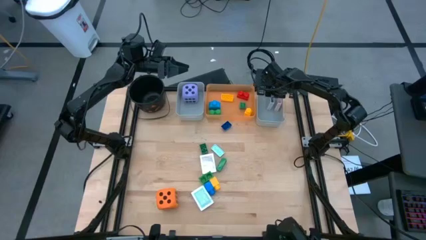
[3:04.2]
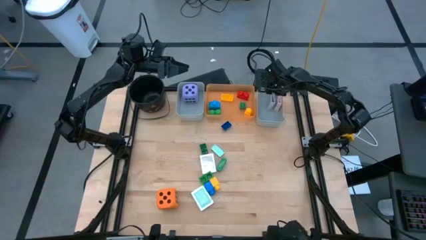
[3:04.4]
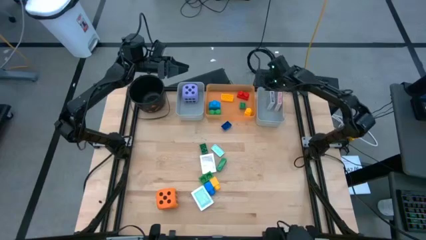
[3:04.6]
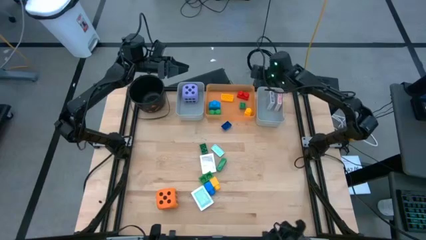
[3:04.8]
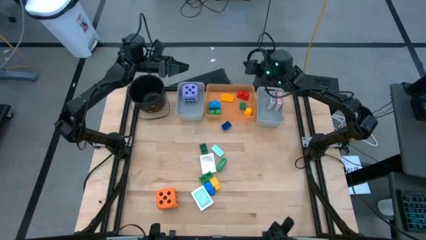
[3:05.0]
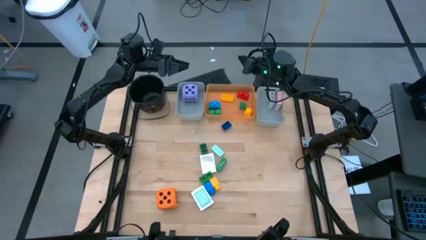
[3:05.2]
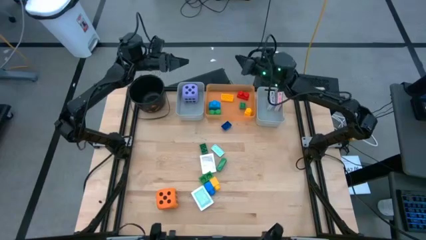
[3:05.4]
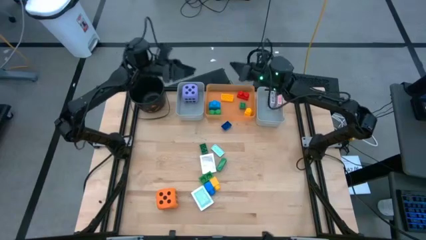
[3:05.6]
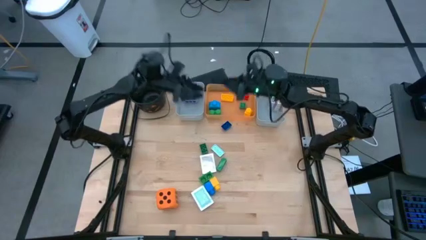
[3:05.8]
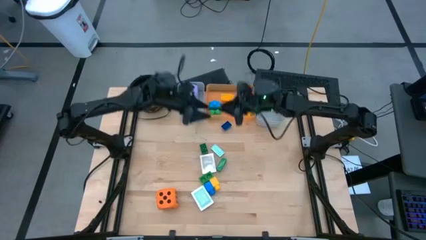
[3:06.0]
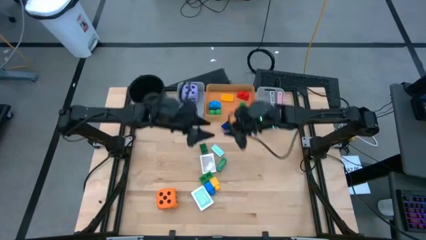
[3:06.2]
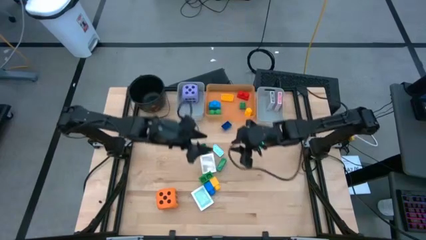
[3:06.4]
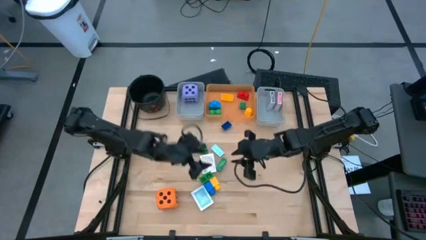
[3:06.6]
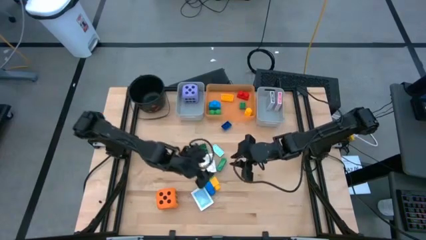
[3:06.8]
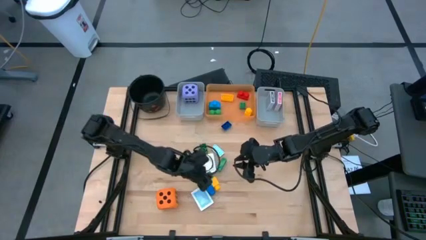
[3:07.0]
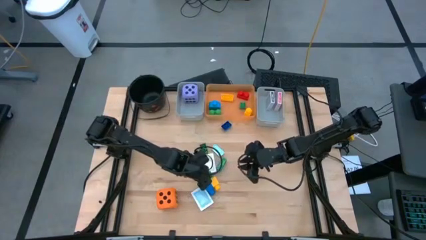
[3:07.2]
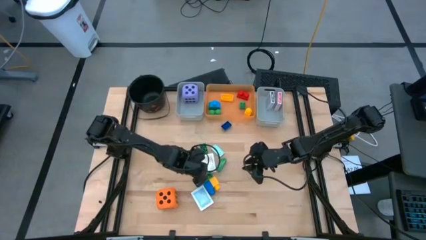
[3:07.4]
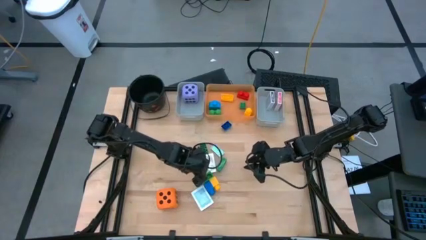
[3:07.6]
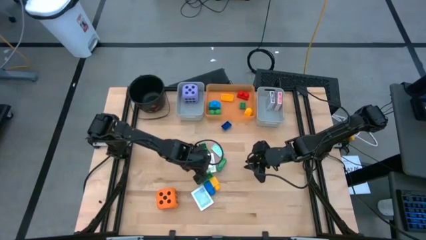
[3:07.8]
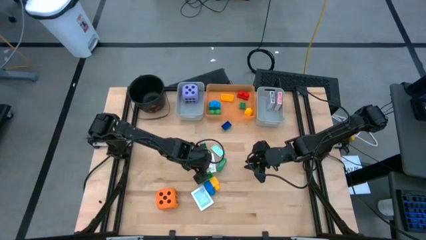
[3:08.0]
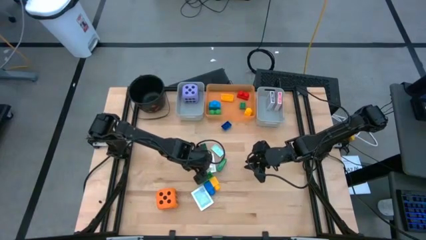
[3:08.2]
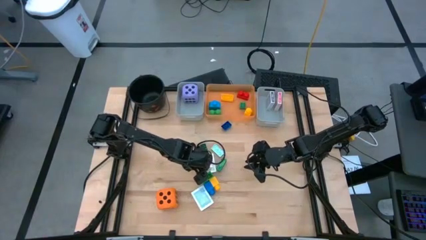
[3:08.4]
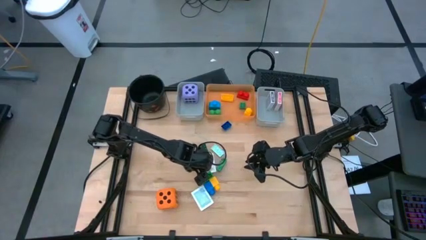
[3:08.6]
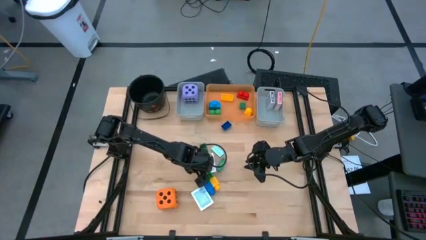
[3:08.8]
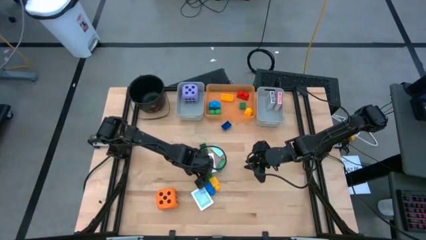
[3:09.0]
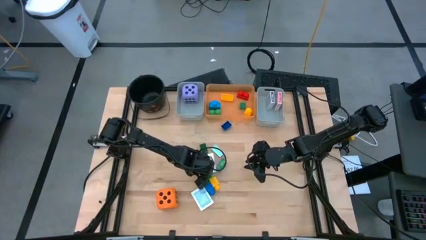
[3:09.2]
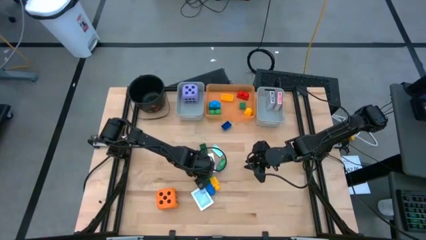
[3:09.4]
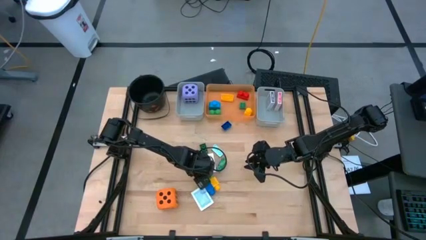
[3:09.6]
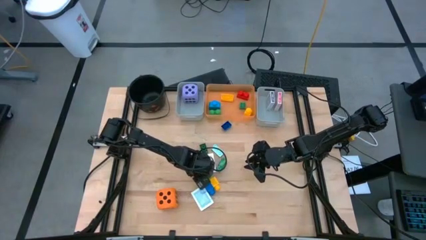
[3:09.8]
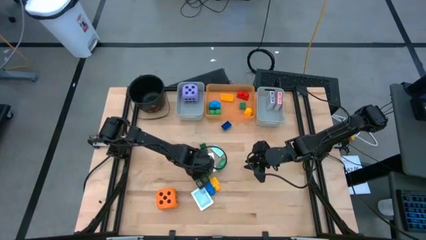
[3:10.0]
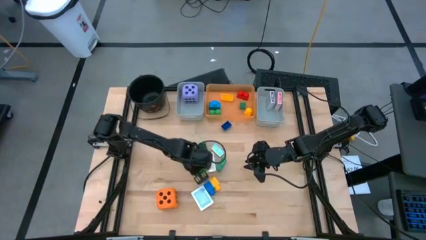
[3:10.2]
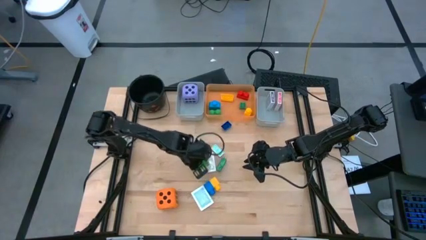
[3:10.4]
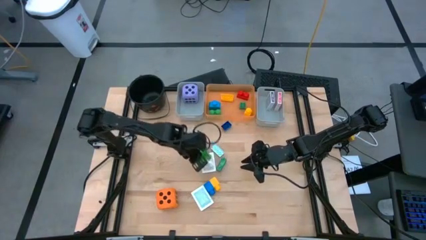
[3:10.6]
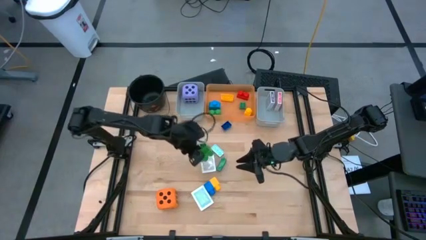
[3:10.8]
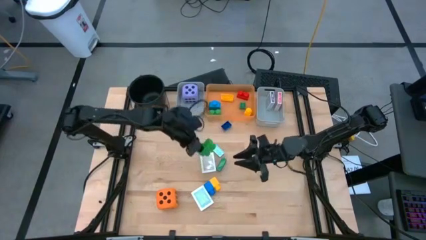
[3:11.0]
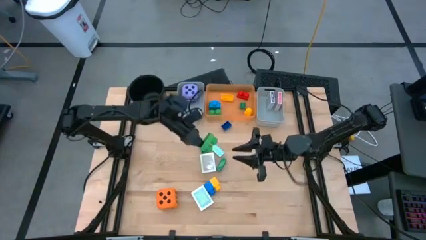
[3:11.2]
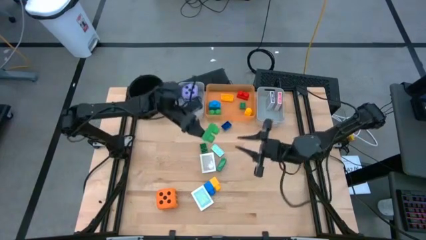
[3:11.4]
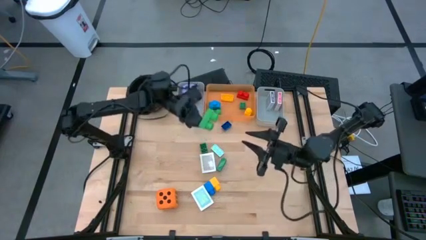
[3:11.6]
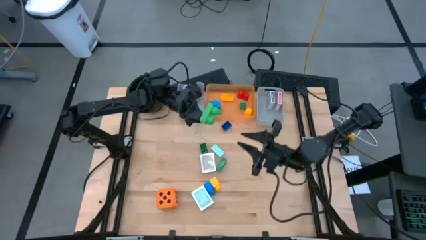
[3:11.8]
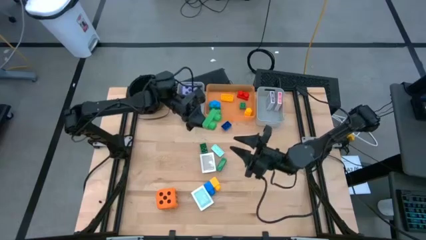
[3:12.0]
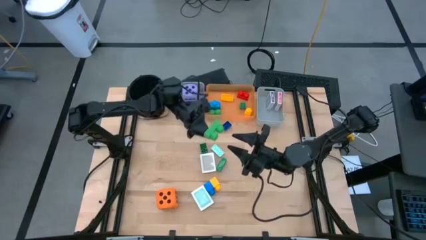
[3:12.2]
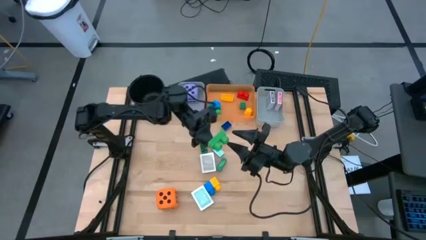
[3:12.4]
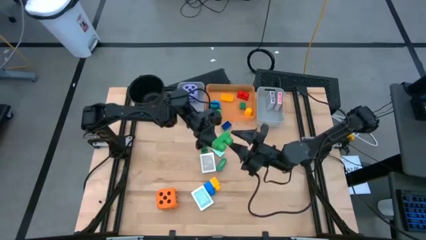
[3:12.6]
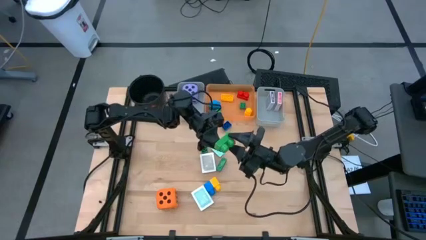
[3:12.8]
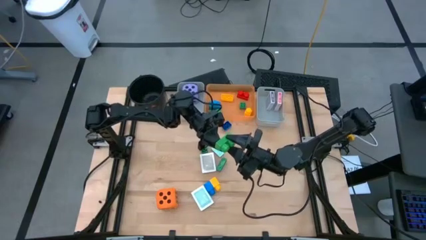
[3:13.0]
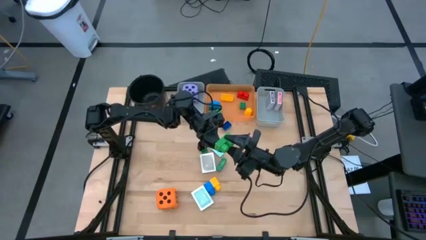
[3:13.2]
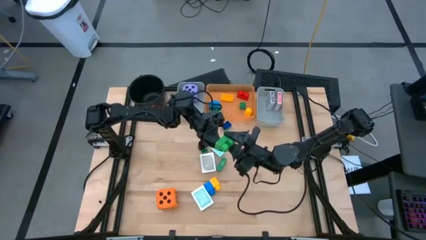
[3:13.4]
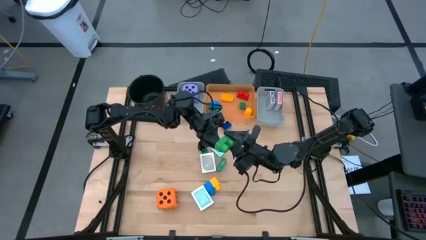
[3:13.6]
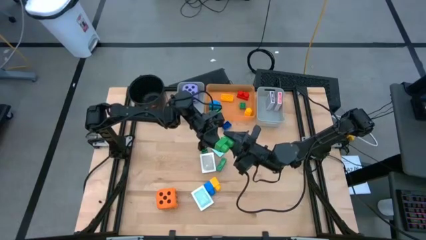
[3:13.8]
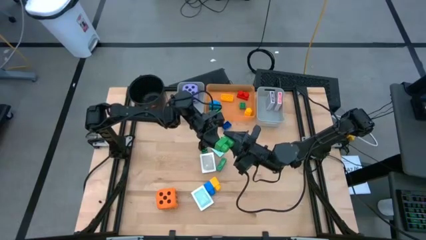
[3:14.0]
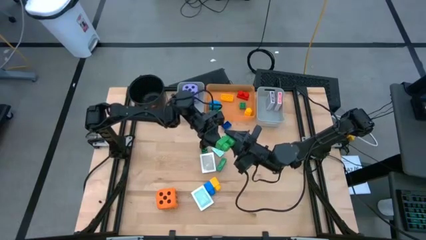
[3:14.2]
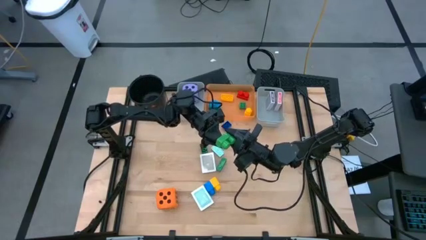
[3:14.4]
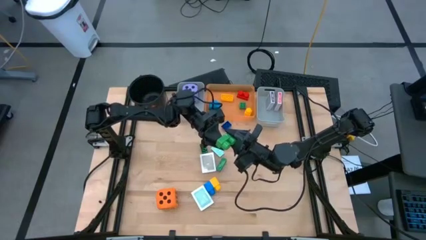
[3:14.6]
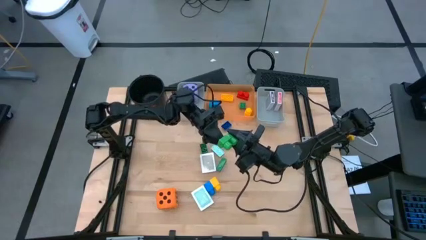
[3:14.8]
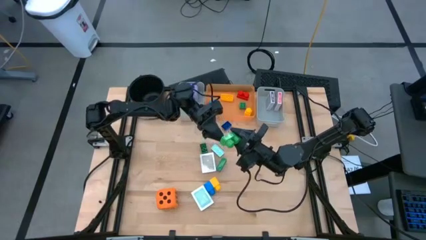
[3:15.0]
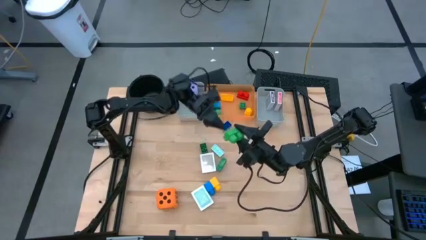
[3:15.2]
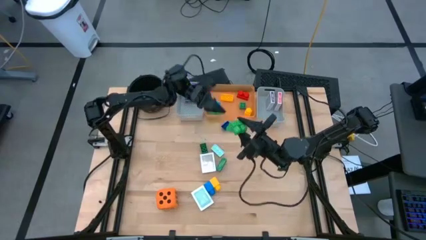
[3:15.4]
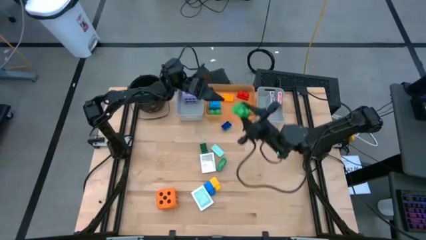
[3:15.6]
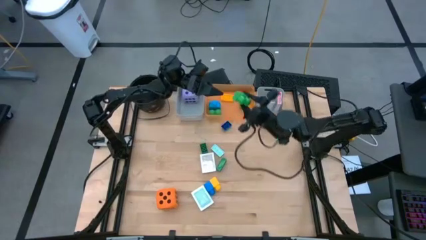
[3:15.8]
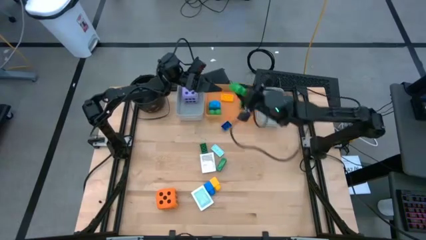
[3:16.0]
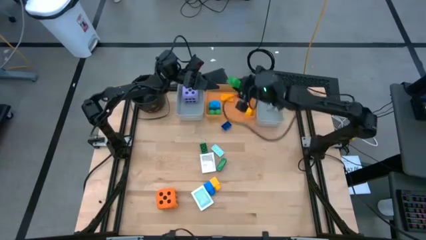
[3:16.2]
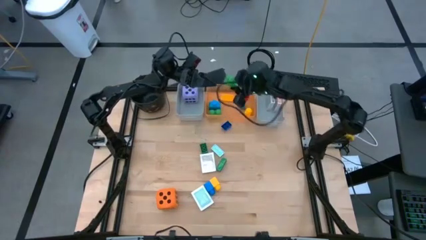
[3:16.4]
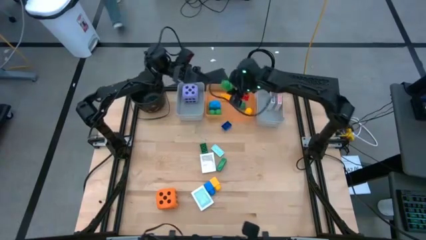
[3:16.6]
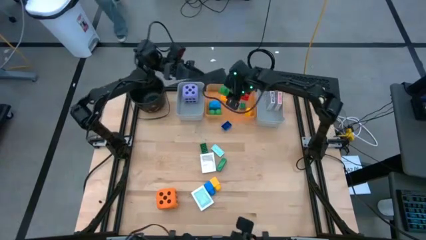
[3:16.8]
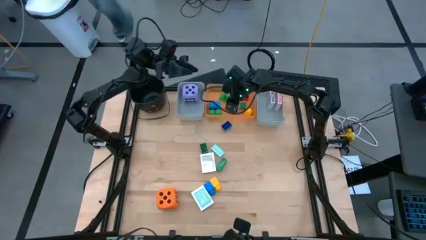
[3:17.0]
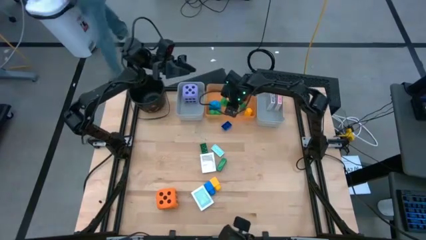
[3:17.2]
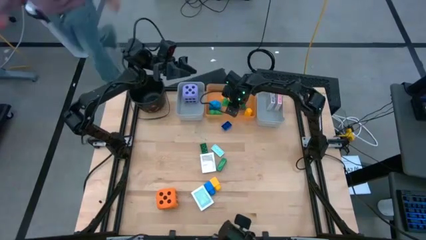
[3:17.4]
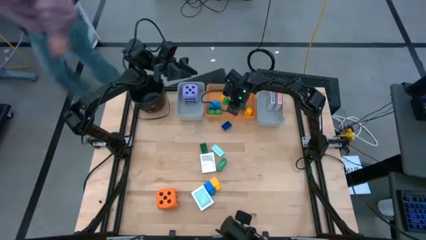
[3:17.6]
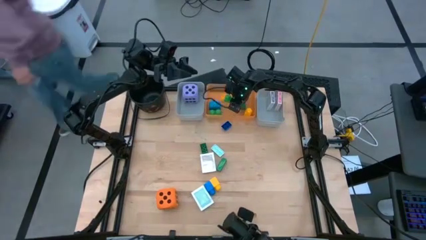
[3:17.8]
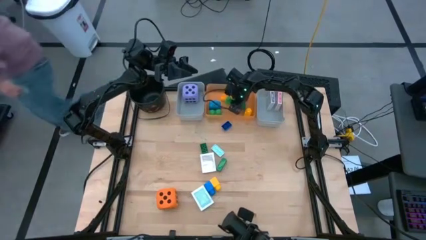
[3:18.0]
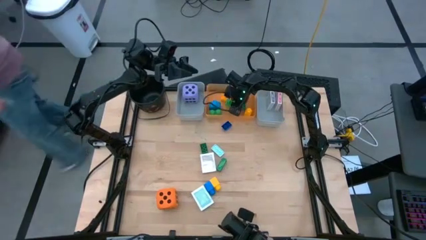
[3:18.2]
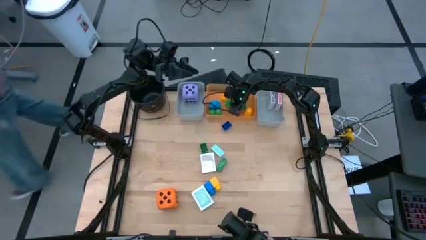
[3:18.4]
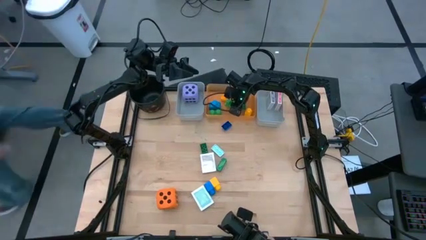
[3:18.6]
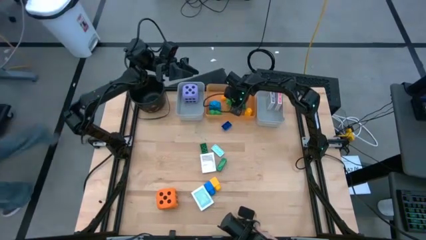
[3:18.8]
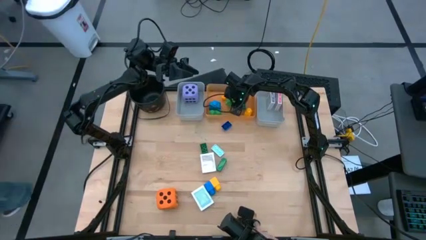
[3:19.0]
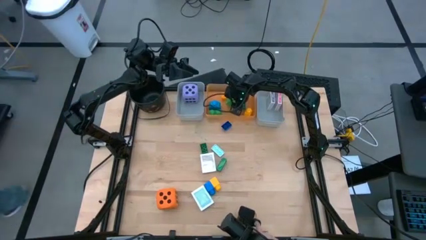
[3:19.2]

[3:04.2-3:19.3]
Task: Pick & Place Toys
Put the green game piece into the orange bin
